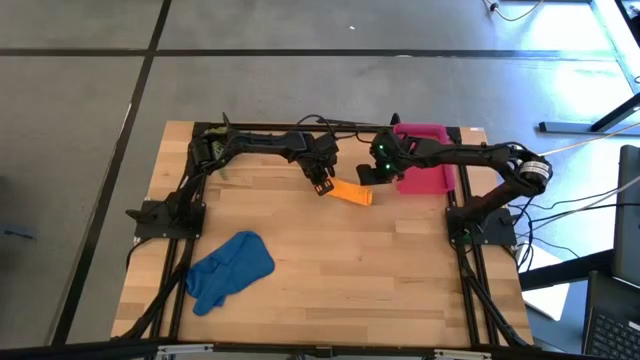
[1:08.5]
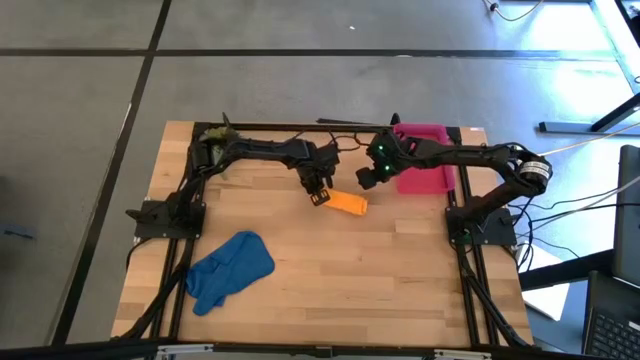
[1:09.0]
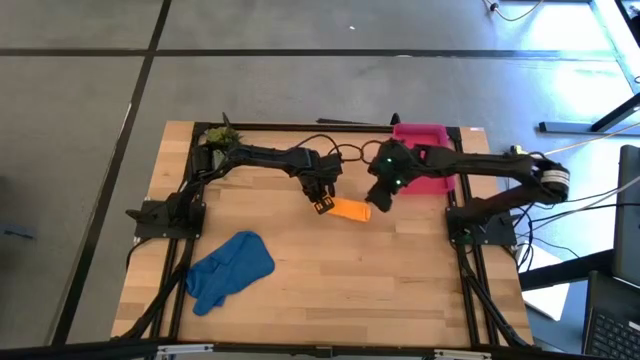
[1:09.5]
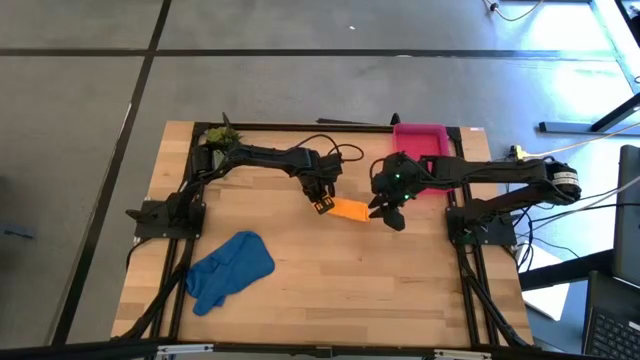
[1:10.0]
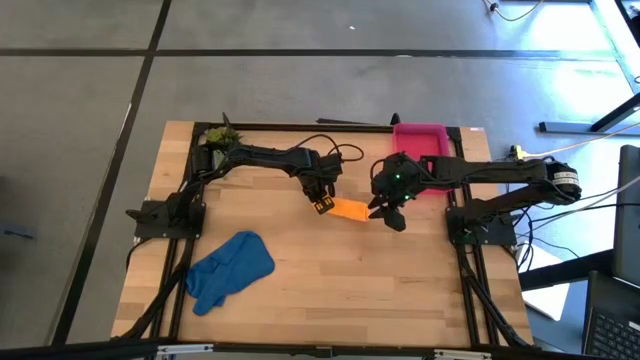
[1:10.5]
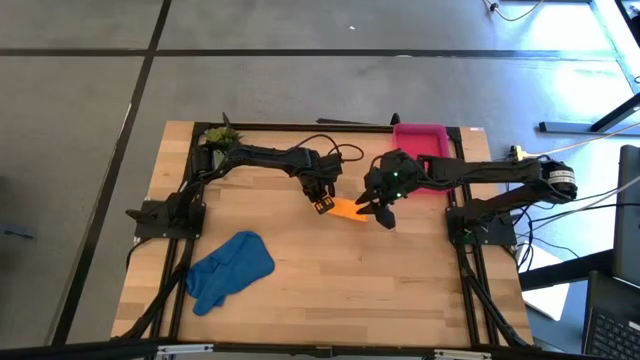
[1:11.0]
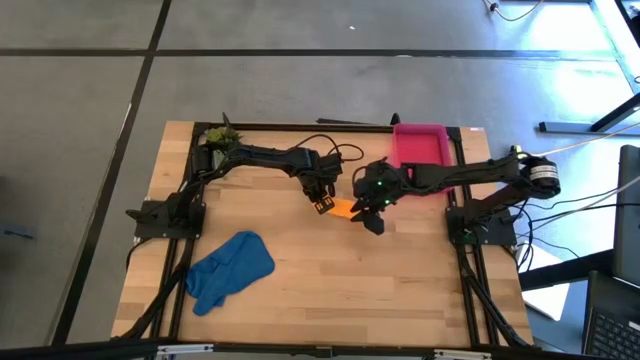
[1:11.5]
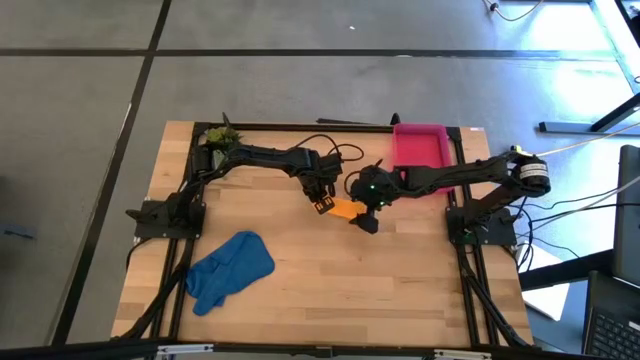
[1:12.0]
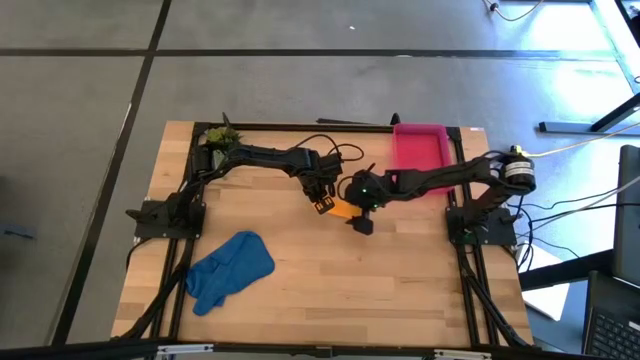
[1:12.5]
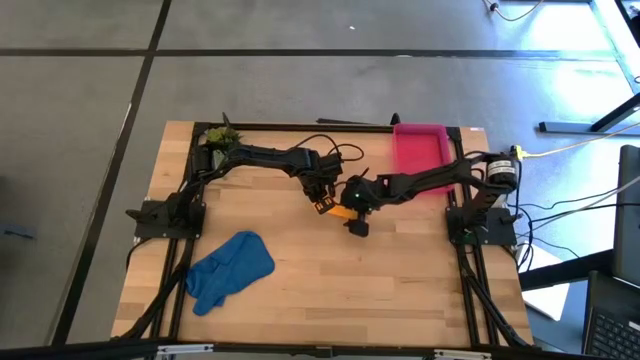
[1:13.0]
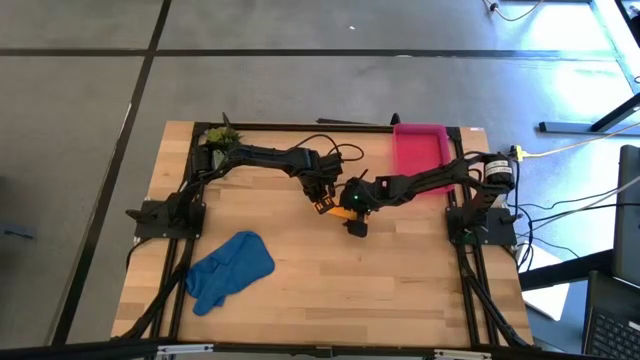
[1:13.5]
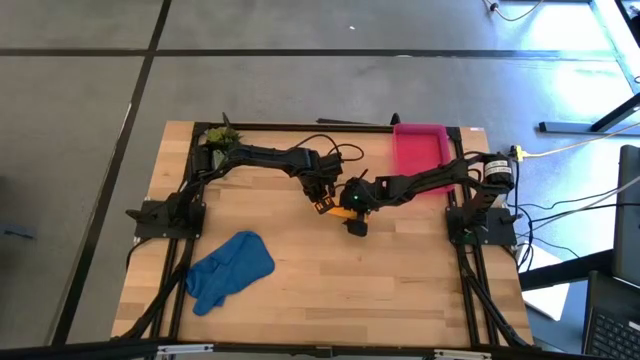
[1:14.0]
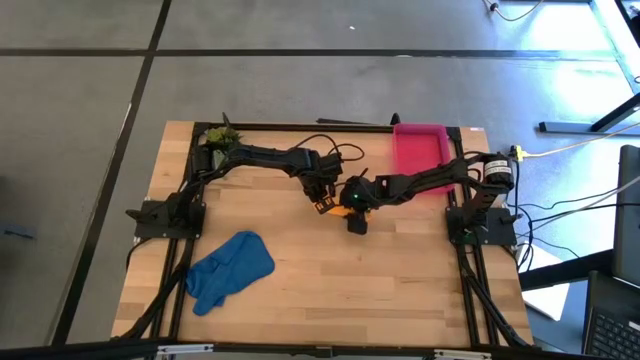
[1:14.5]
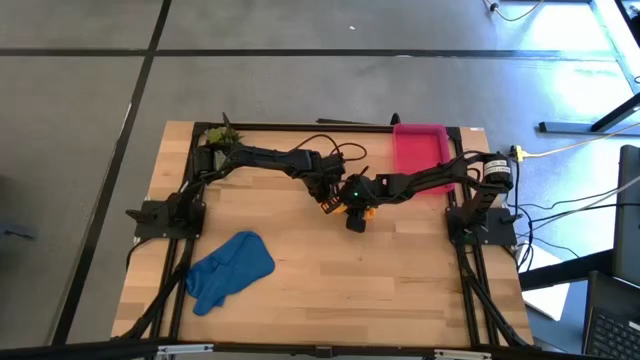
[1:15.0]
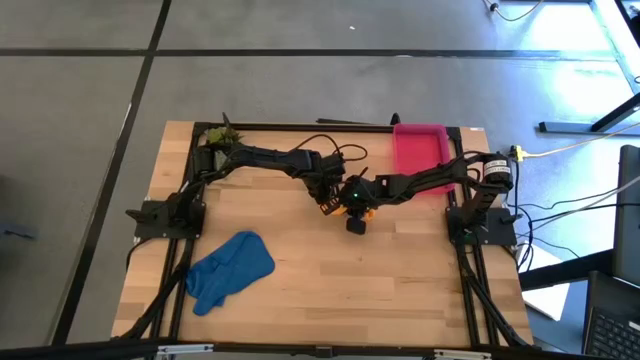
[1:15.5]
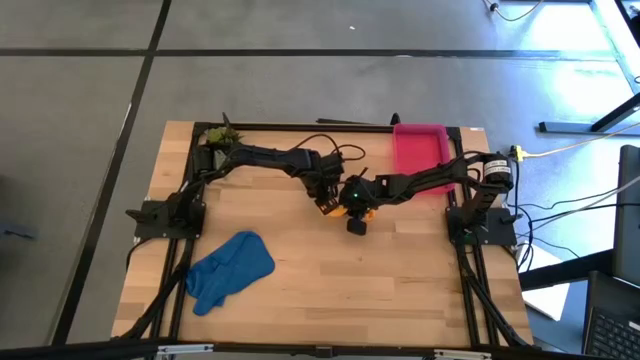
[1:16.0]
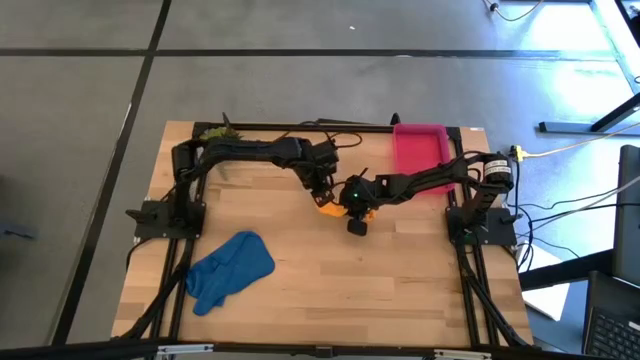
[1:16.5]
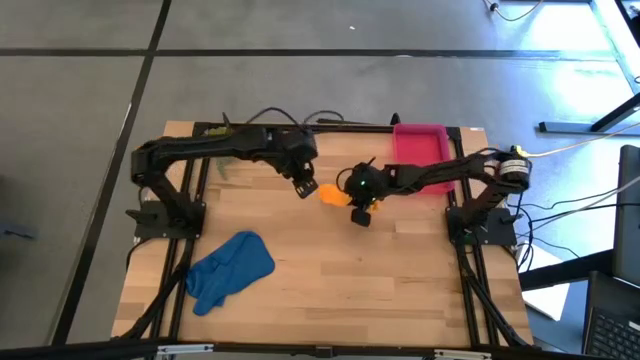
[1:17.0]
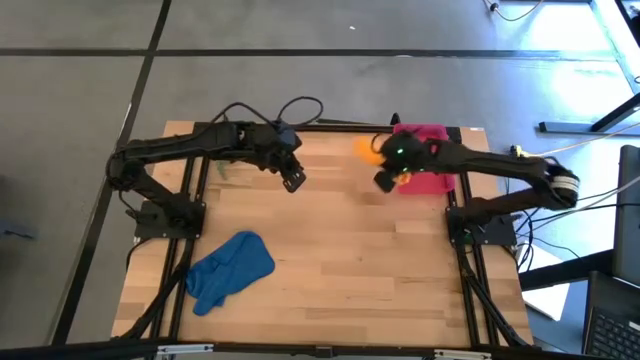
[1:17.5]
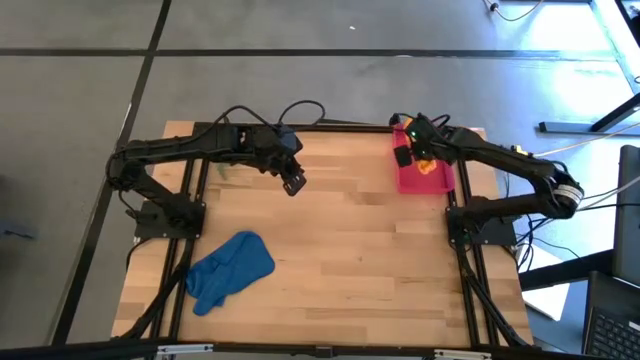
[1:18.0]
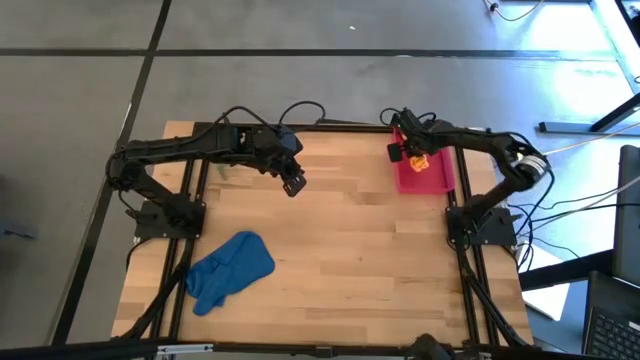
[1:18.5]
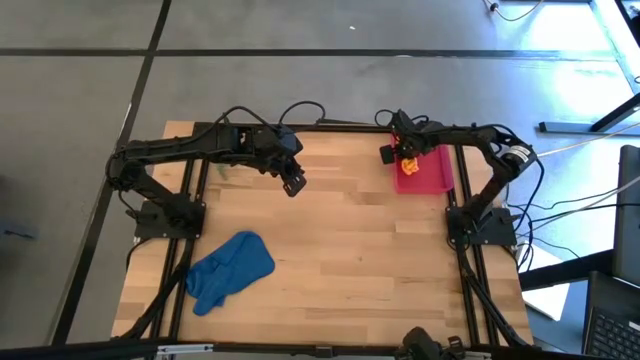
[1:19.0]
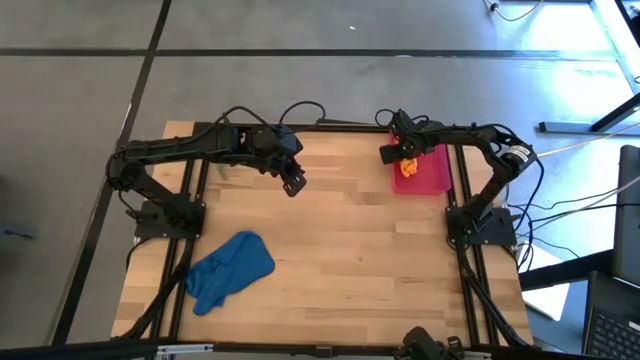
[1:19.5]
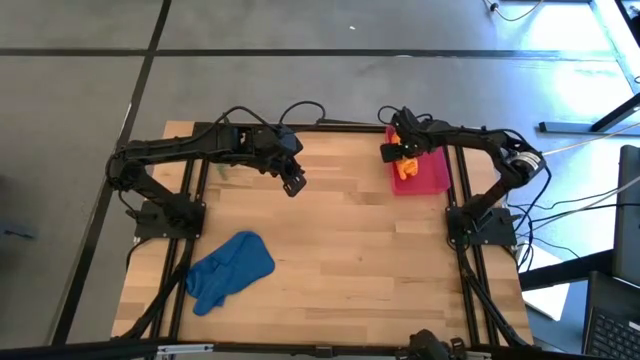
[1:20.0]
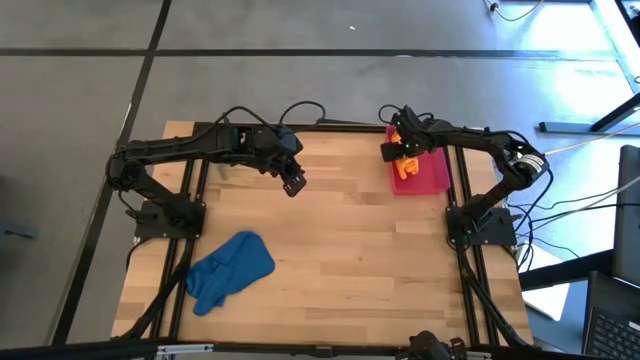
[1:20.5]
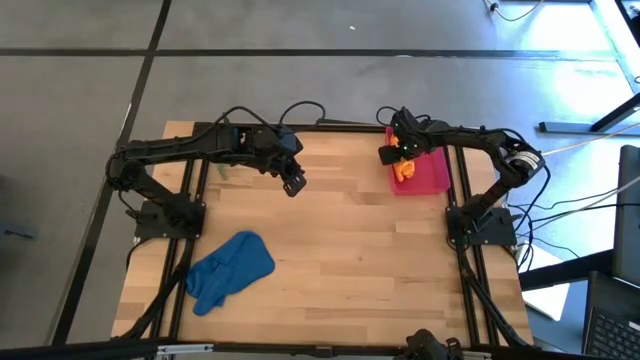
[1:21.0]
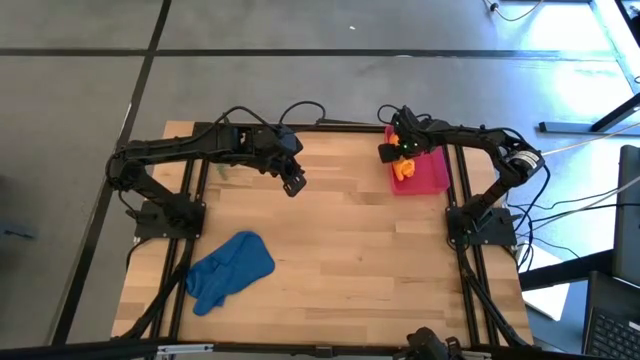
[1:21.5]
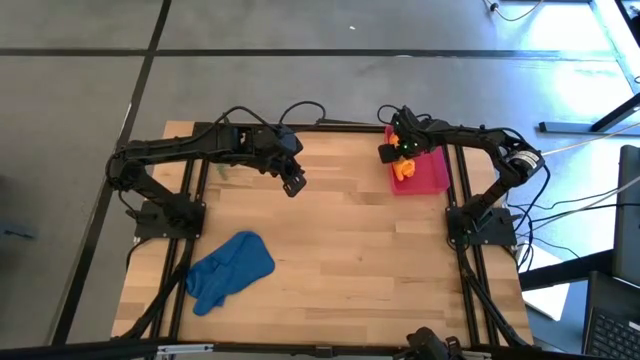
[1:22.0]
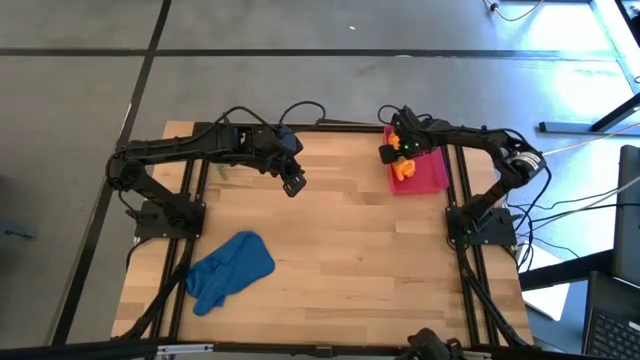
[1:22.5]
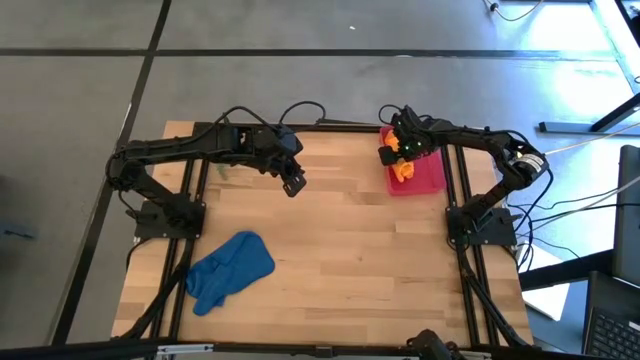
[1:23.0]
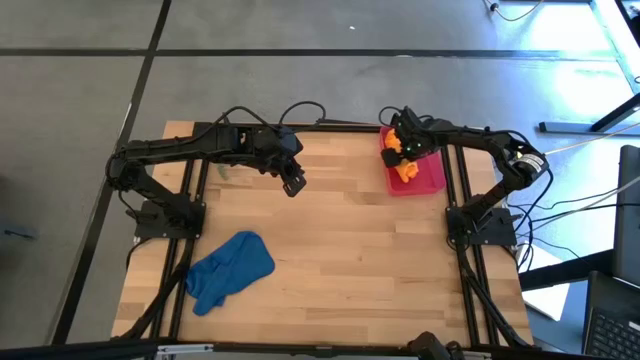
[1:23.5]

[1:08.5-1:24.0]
Task: Roll microfiber towels into tight, uniform cylinder then place into a basket
Put the rolled orange microfiber towel into the bin

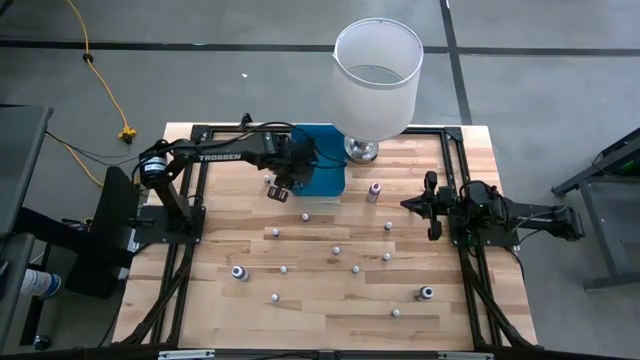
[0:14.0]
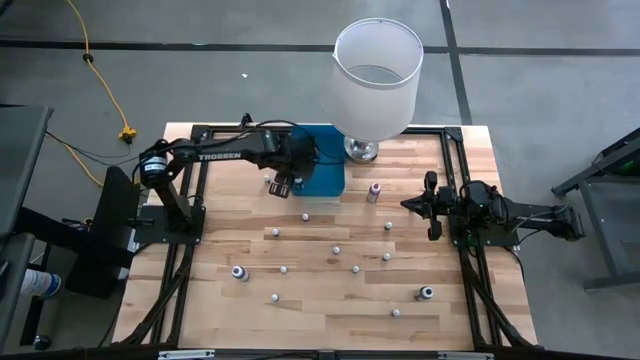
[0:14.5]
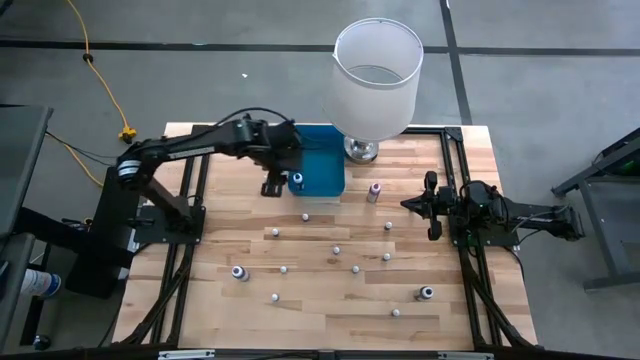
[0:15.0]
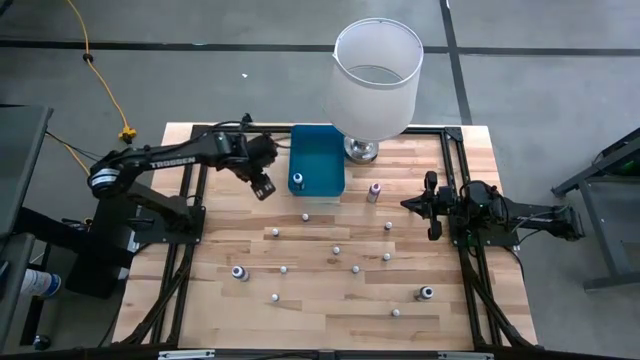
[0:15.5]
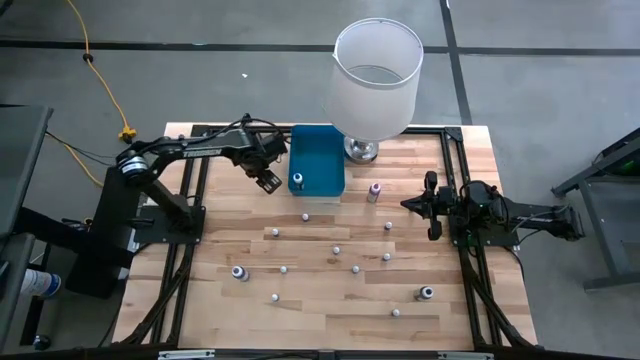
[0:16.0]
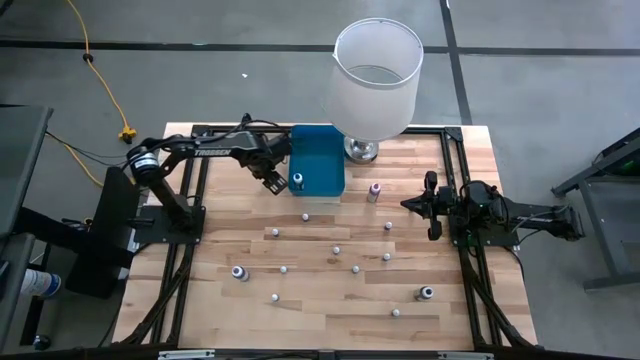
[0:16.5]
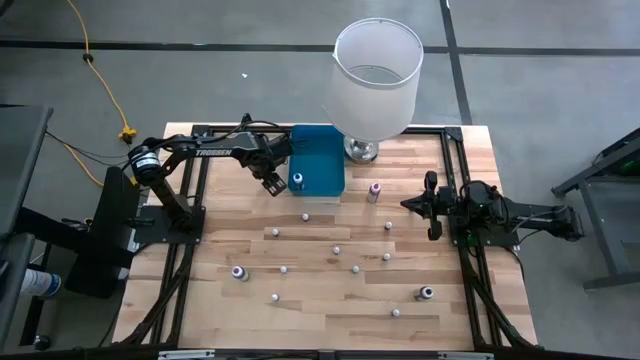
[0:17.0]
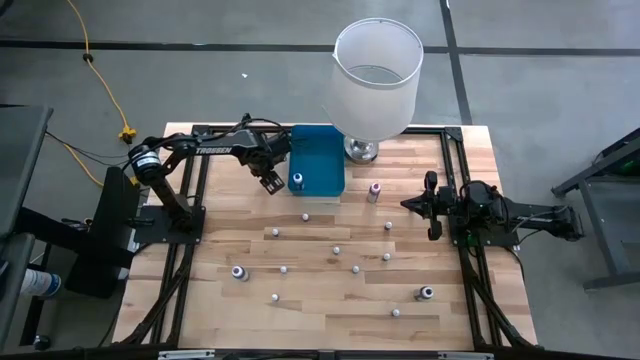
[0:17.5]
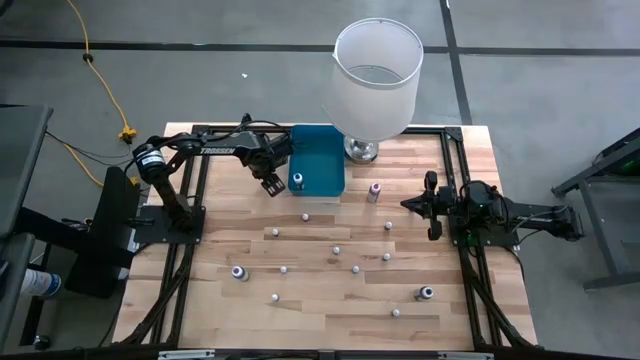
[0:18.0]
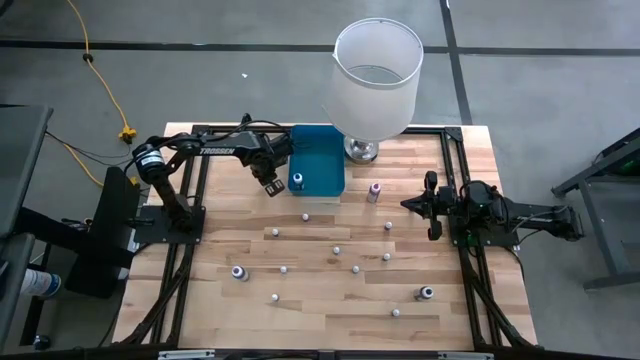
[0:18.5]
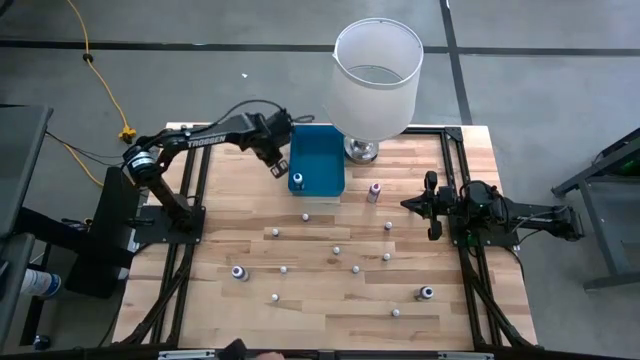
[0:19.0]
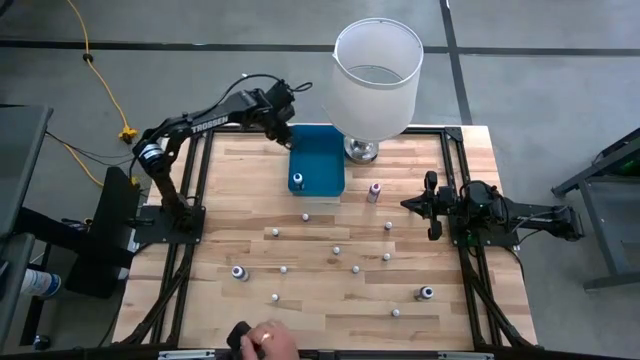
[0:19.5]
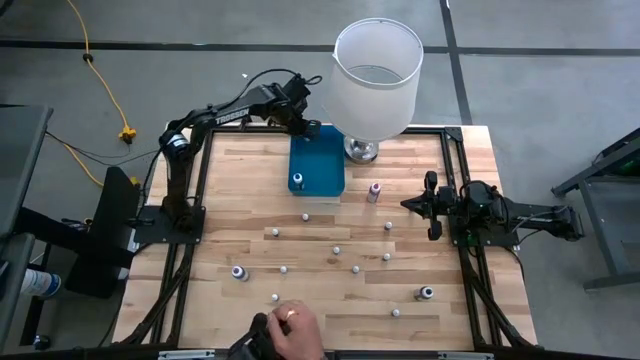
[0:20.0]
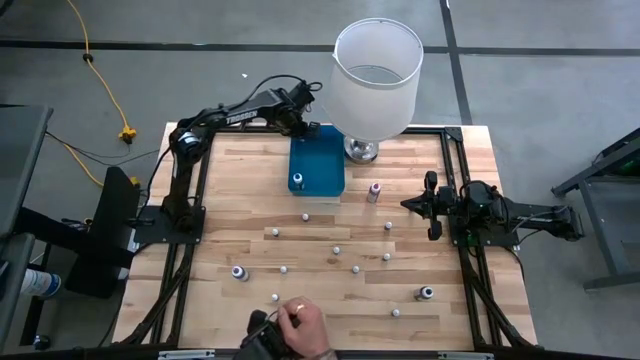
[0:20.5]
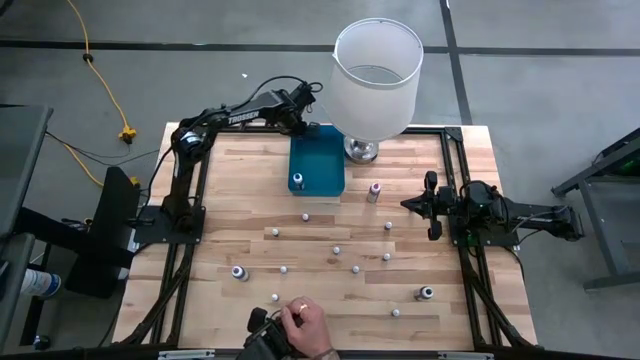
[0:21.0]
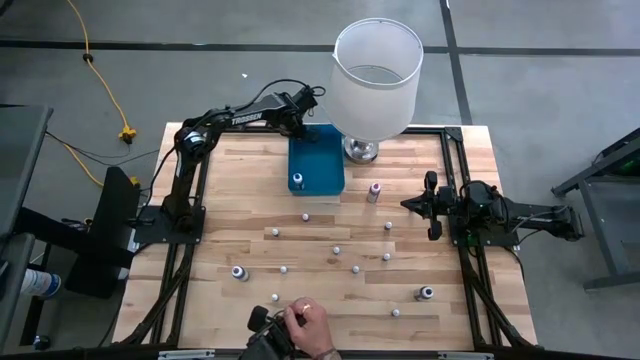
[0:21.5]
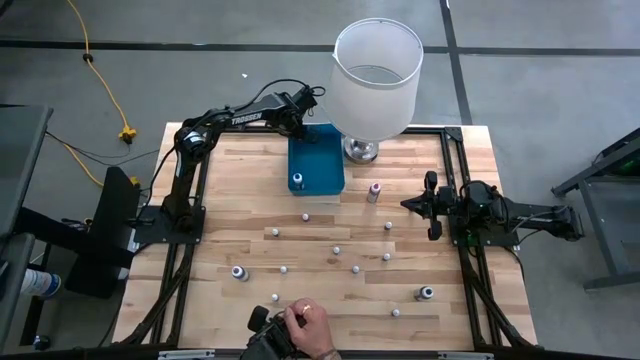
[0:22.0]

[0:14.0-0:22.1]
Task: Pick & Place food coloring
Put the small black food coloring bottle into the blue bin
